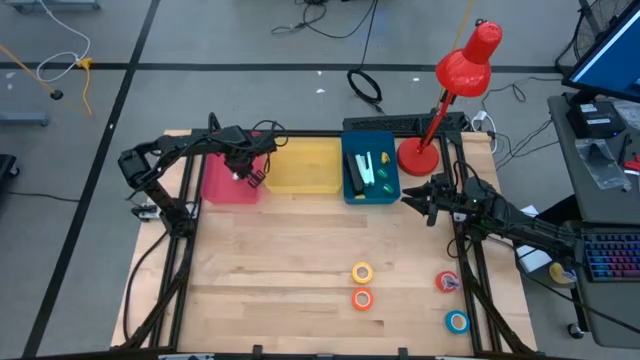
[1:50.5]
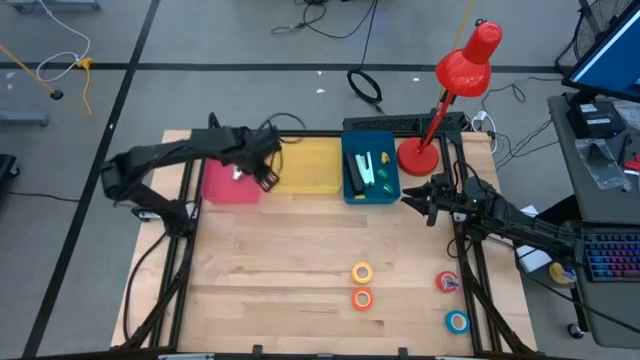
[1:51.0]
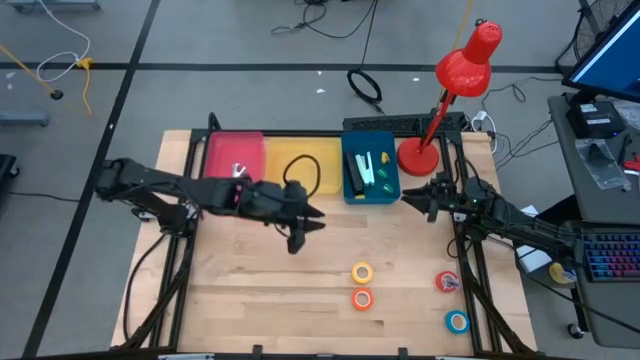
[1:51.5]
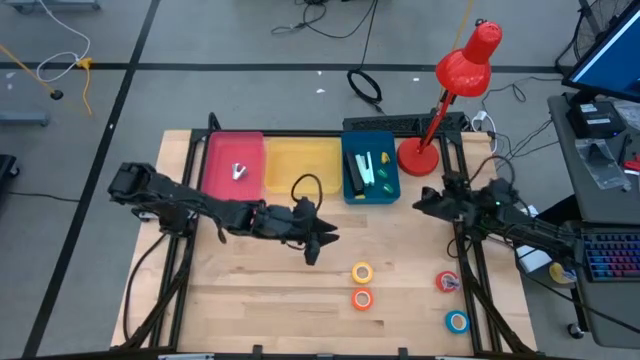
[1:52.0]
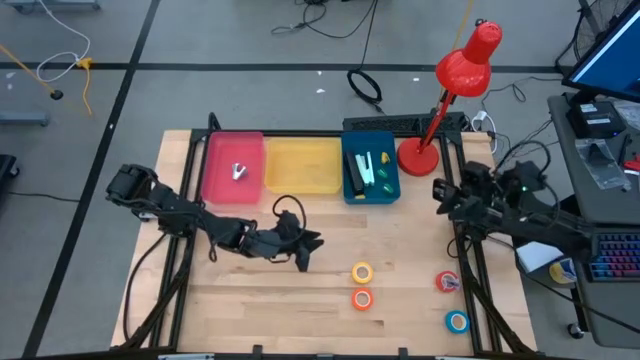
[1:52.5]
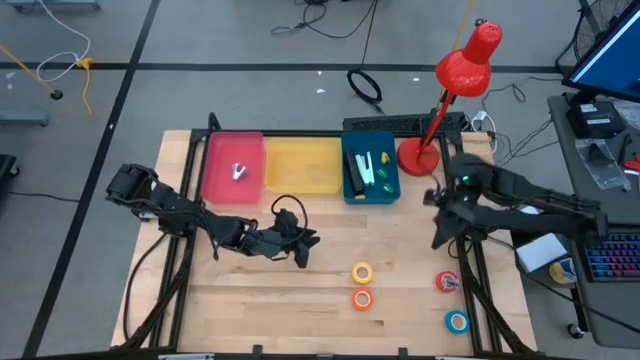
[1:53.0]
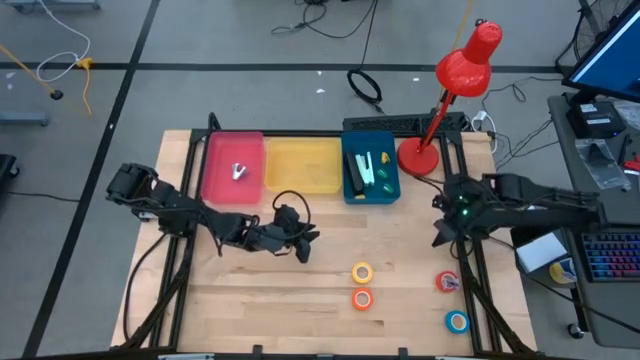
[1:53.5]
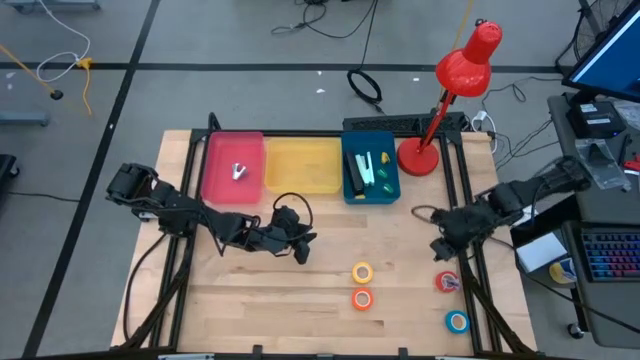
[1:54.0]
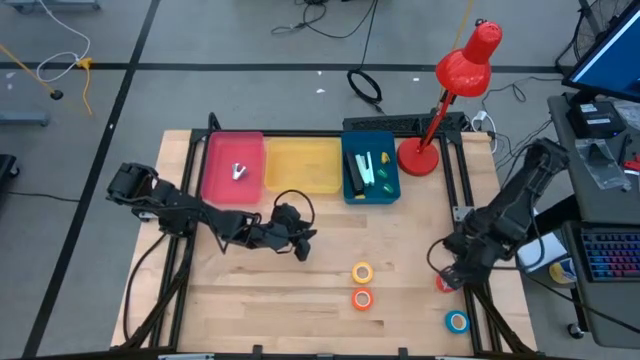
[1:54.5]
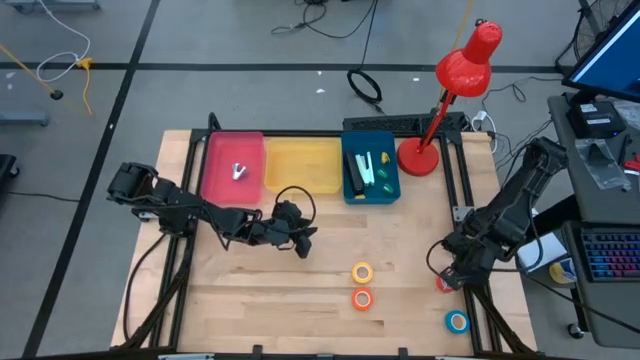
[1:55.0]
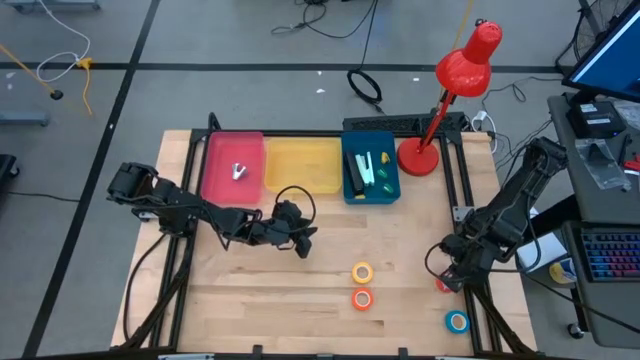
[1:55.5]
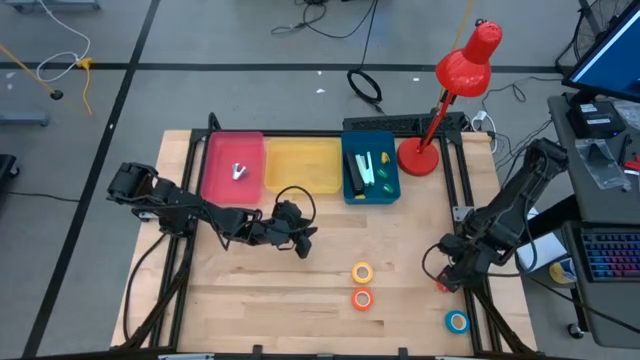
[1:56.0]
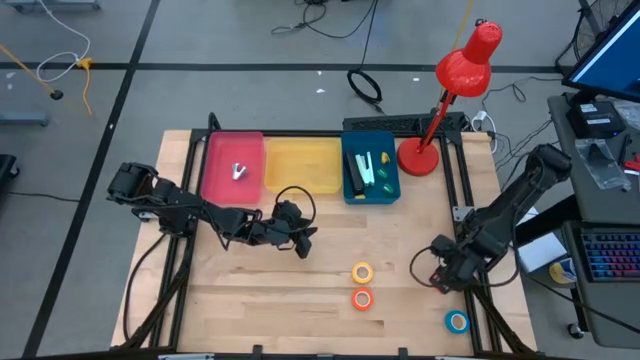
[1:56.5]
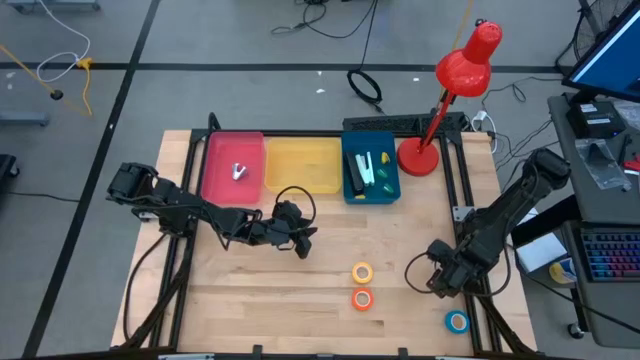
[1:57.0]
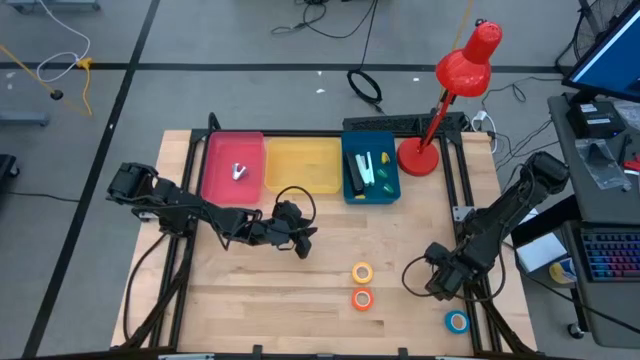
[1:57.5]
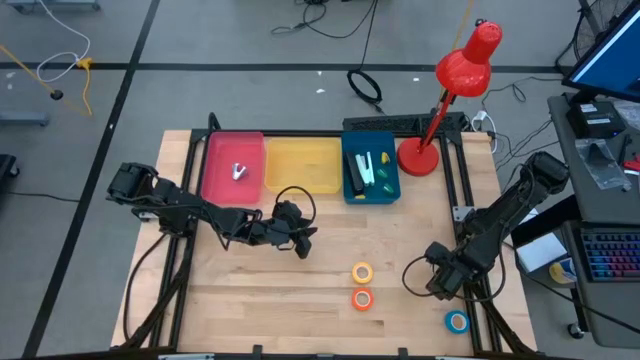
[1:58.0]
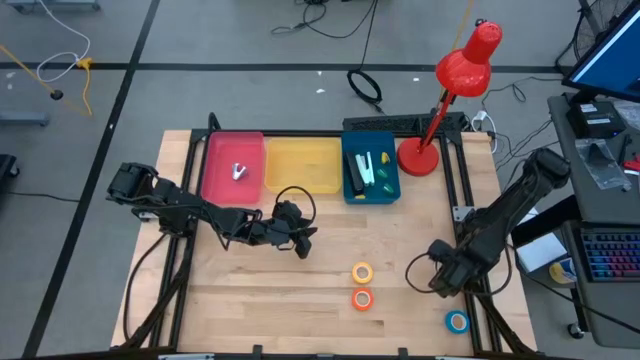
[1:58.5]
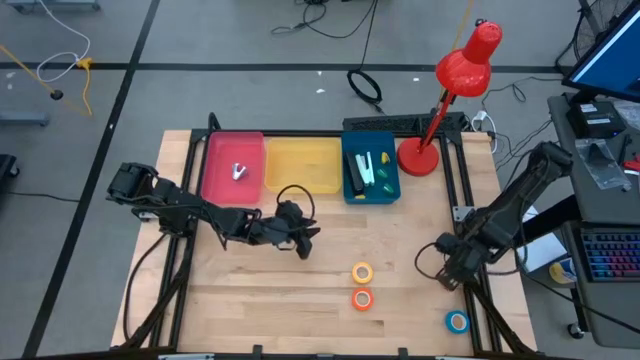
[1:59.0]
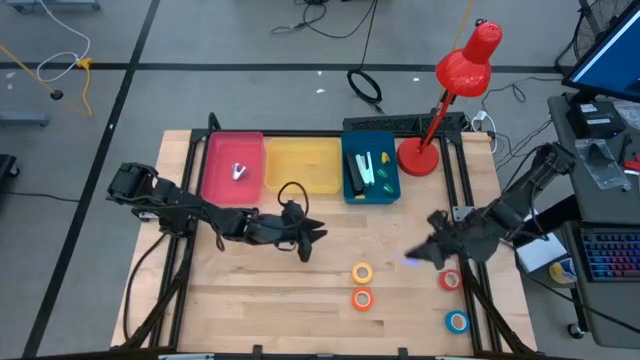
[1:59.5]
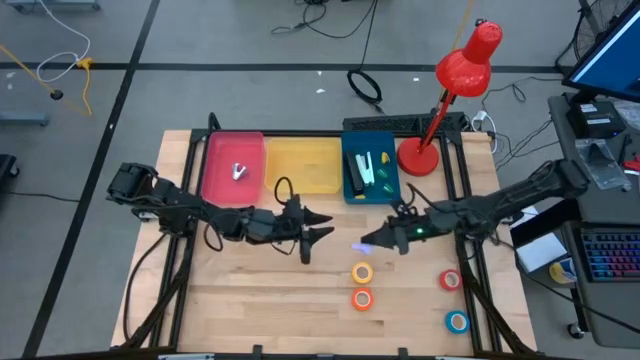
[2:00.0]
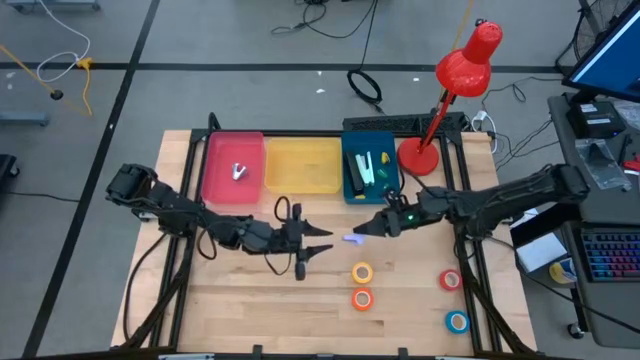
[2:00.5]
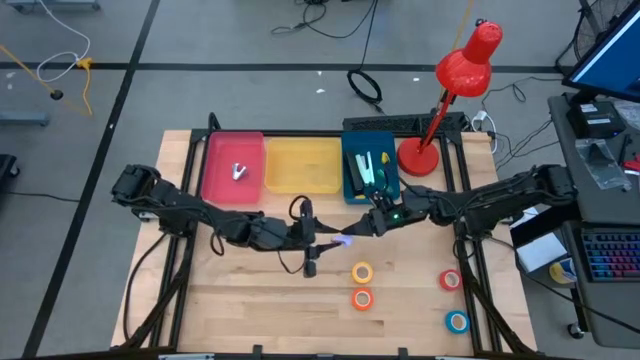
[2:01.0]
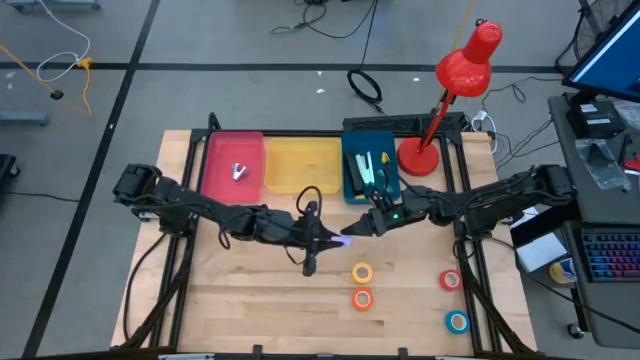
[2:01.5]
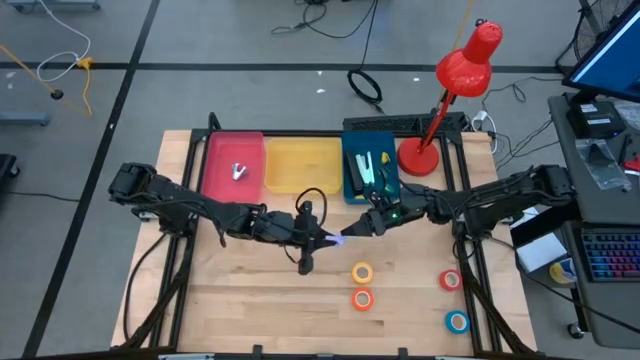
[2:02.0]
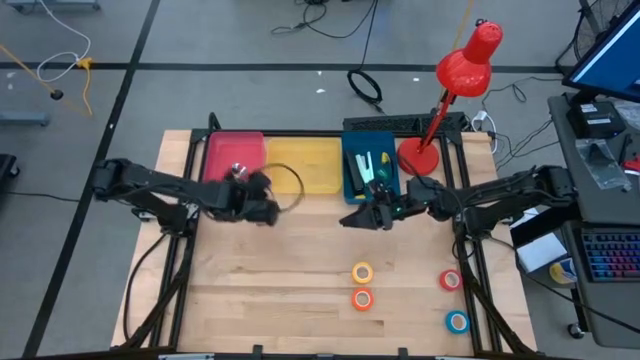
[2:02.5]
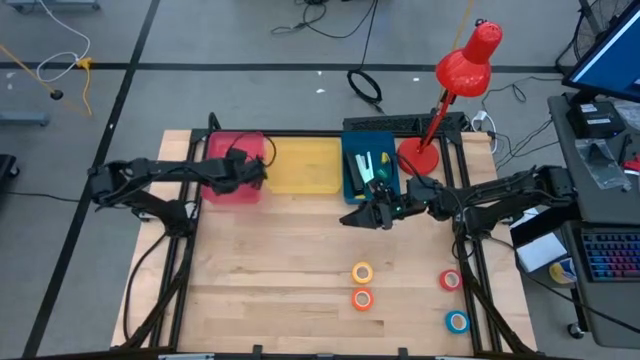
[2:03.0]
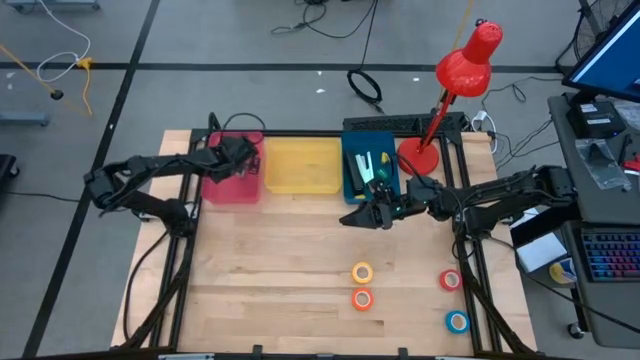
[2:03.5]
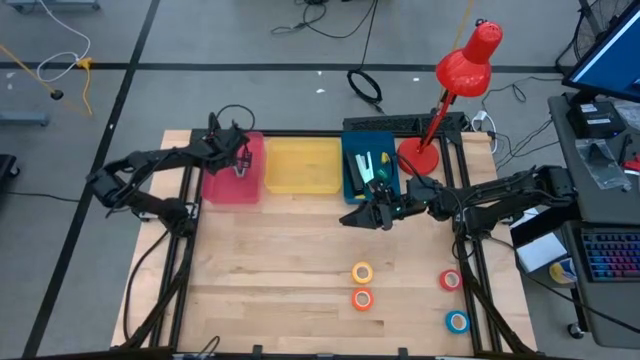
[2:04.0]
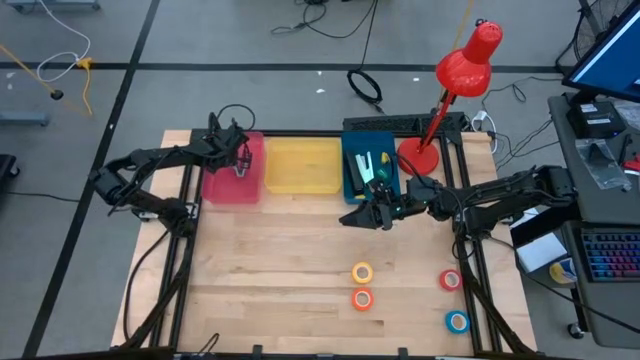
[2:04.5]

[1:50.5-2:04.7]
Task: Pick and place Stapler, Stapler remover, tape
Put the purple stapler remover into the red bin

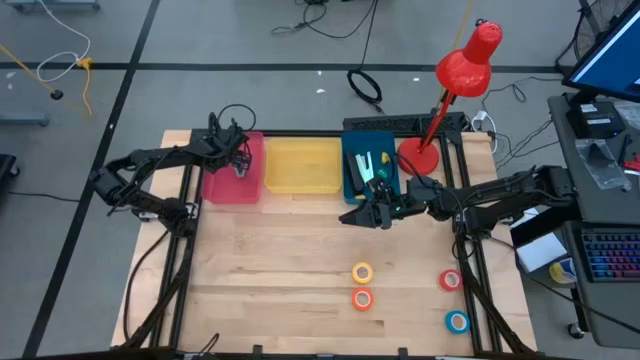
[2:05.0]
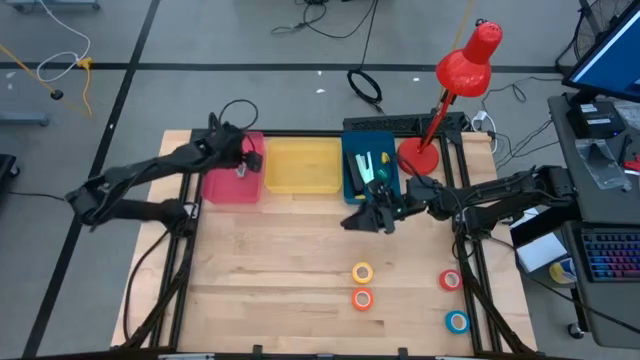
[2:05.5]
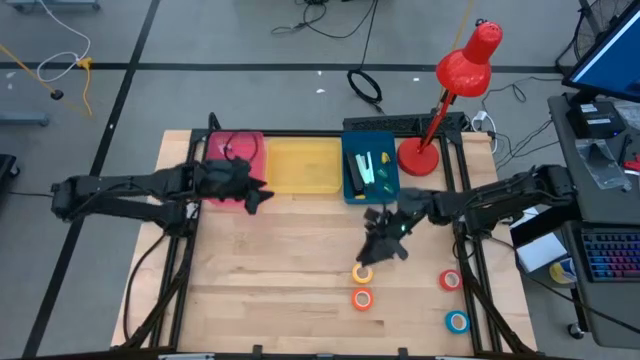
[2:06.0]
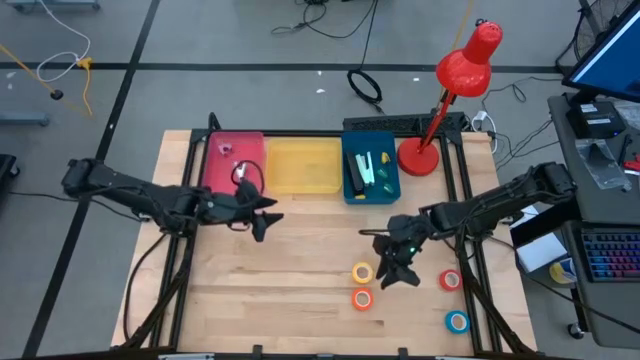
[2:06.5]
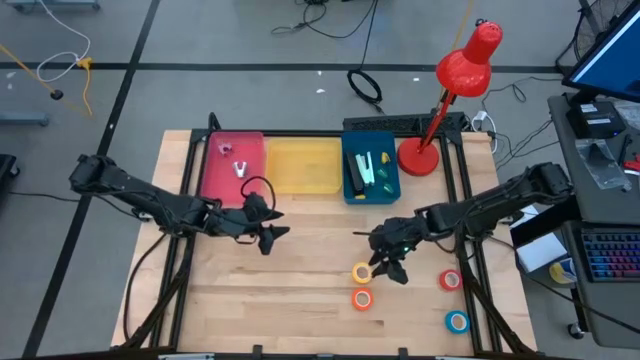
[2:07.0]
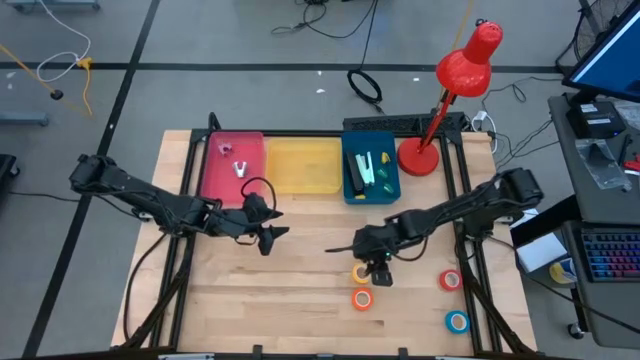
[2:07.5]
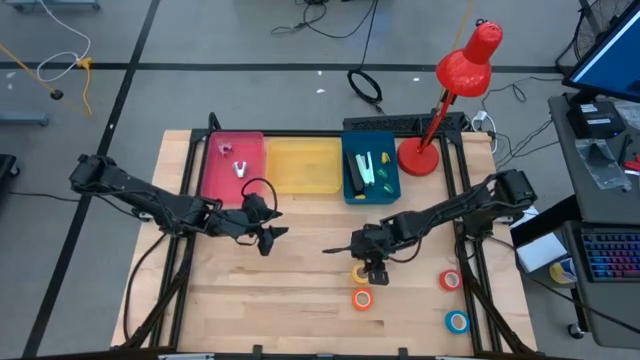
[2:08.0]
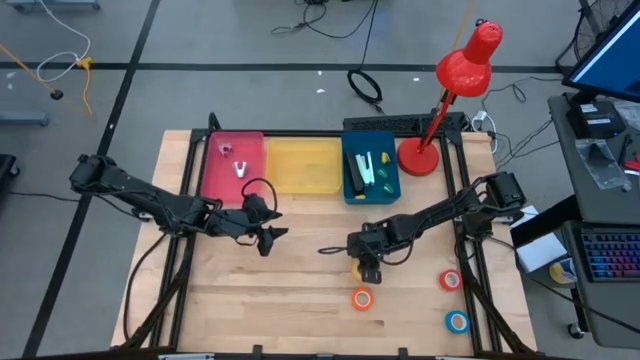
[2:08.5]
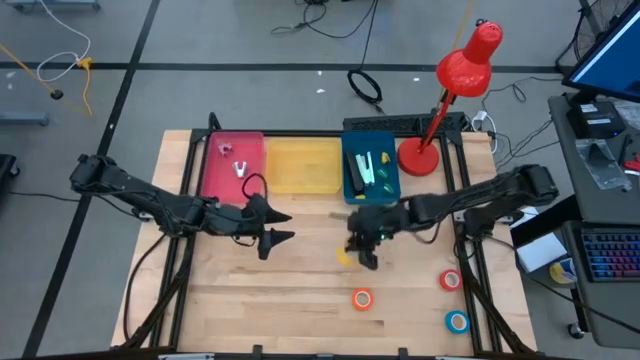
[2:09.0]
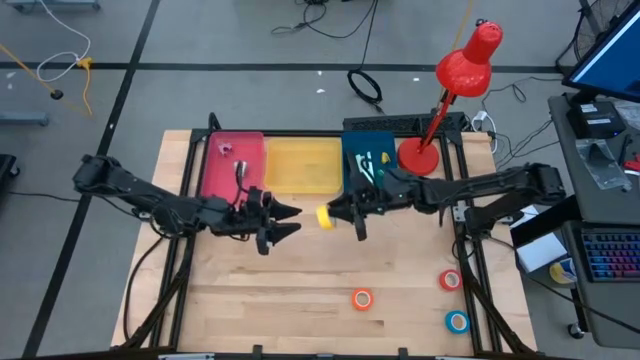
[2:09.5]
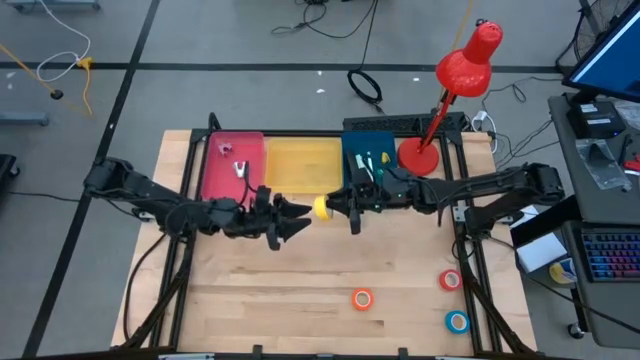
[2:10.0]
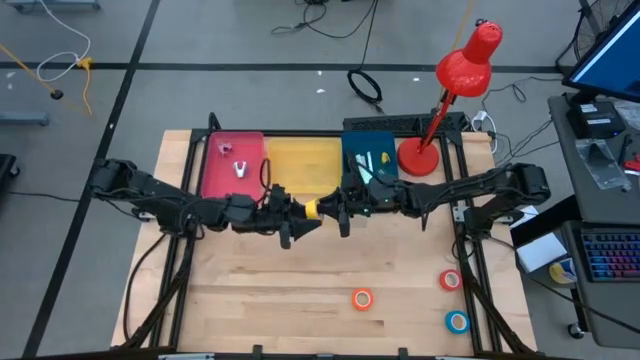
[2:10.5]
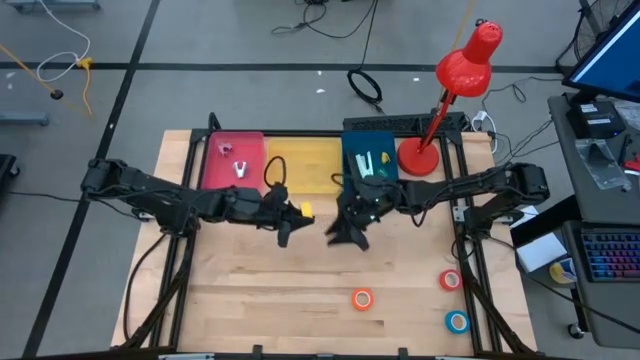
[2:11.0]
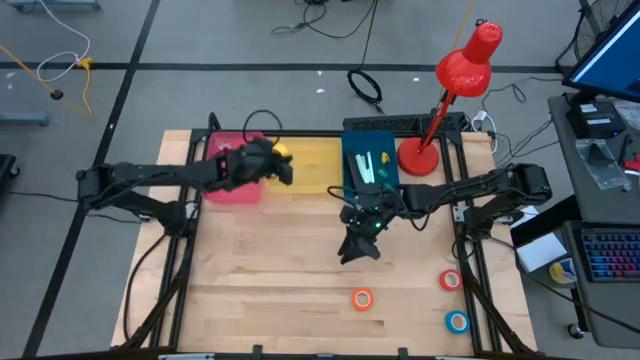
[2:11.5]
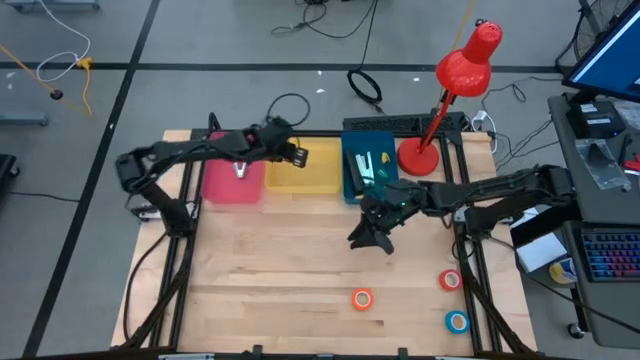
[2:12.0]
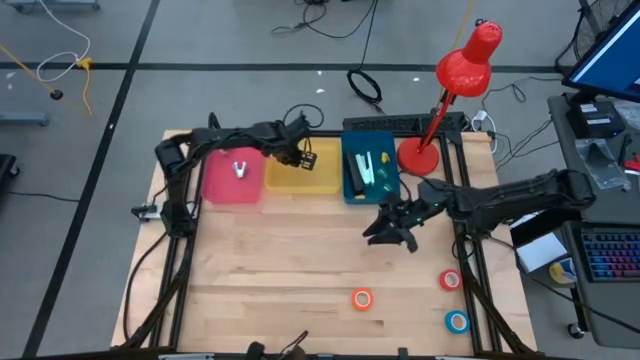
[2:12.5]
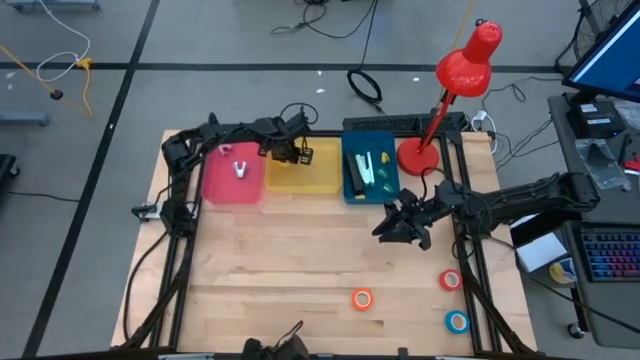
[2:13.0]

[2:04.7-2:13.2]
Put the yellow tape into the yellow bin
